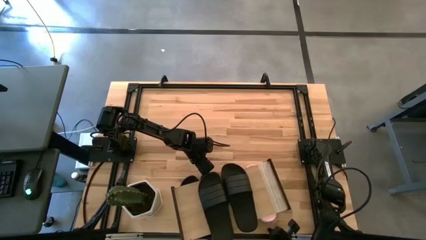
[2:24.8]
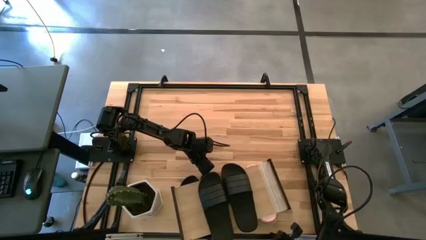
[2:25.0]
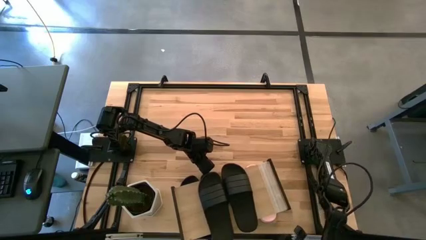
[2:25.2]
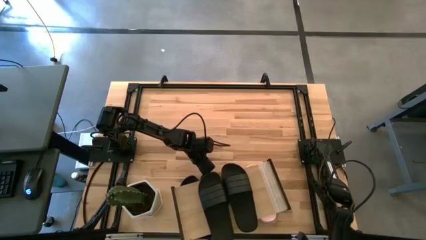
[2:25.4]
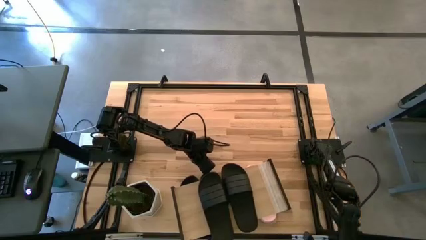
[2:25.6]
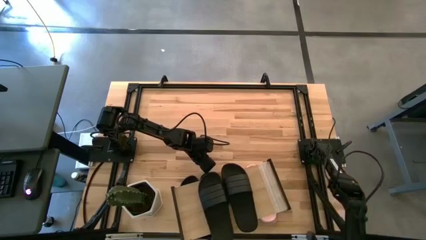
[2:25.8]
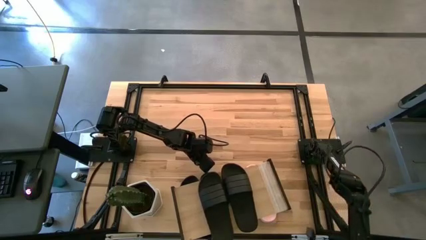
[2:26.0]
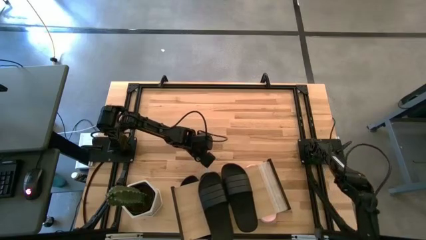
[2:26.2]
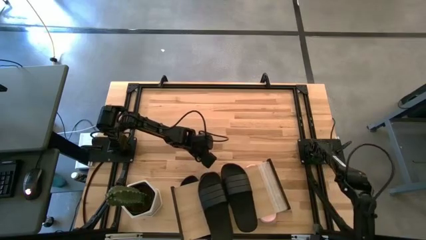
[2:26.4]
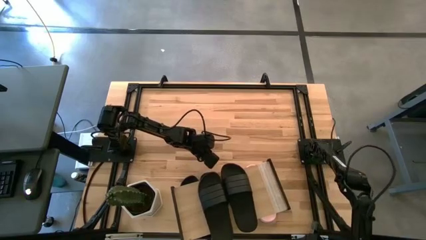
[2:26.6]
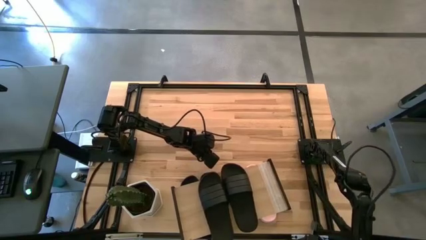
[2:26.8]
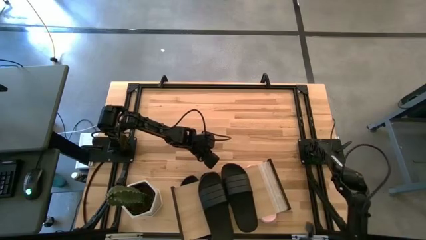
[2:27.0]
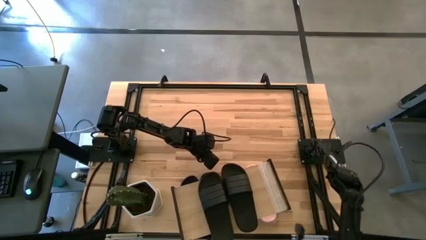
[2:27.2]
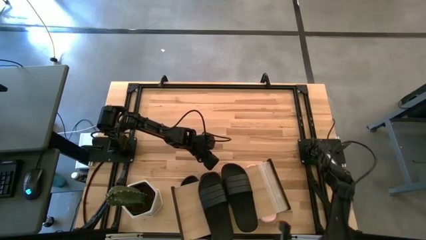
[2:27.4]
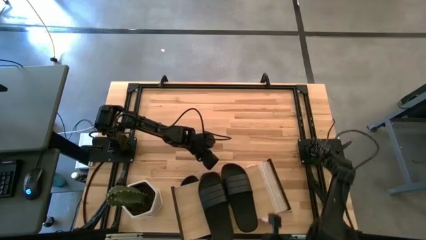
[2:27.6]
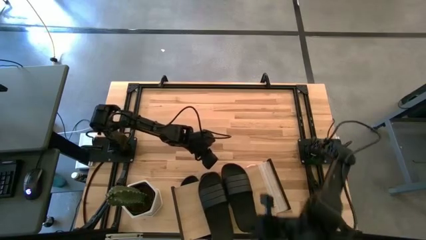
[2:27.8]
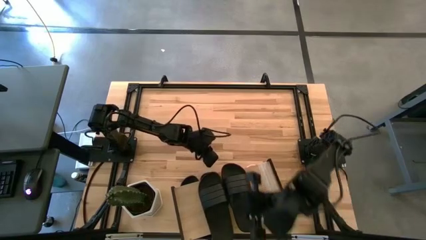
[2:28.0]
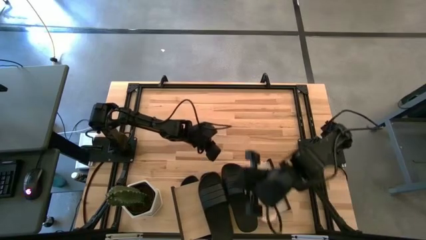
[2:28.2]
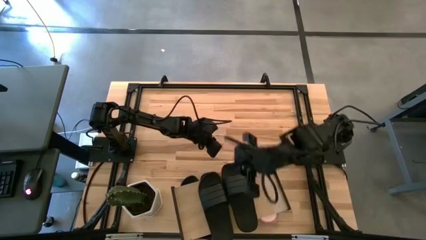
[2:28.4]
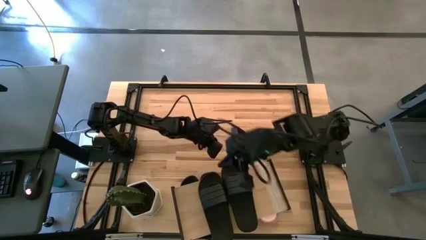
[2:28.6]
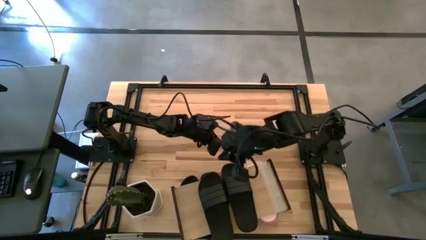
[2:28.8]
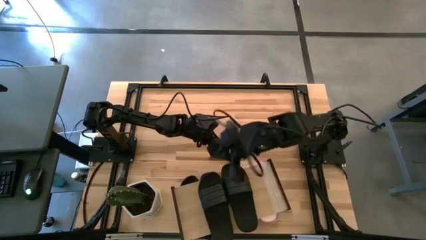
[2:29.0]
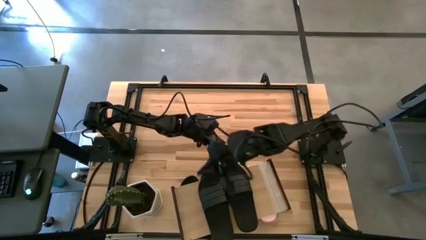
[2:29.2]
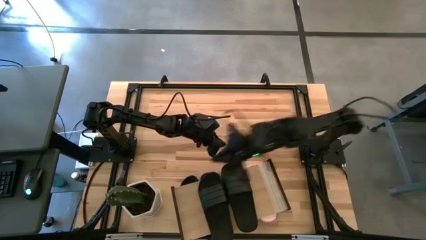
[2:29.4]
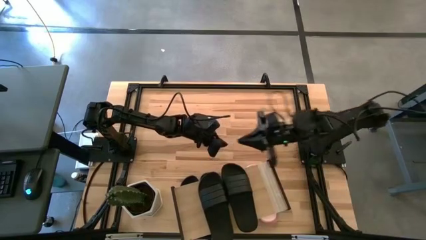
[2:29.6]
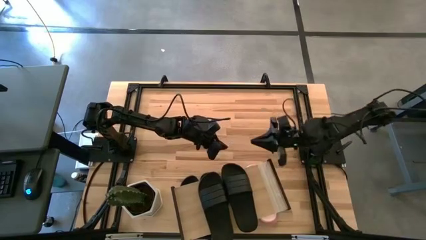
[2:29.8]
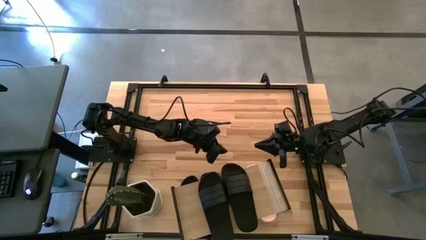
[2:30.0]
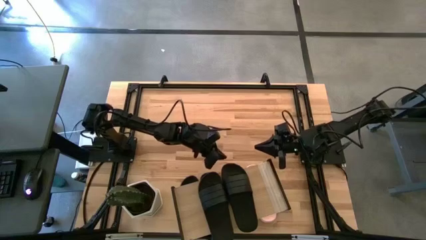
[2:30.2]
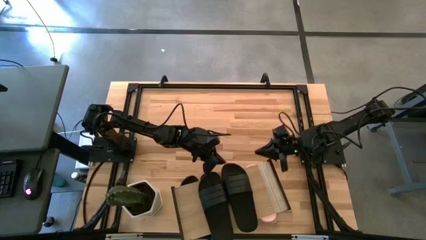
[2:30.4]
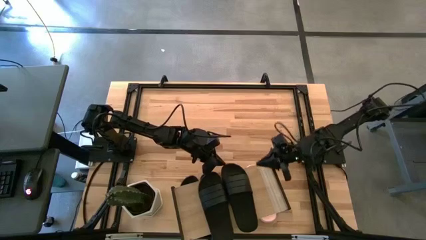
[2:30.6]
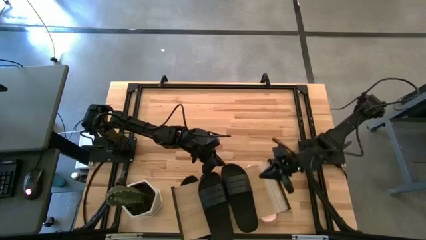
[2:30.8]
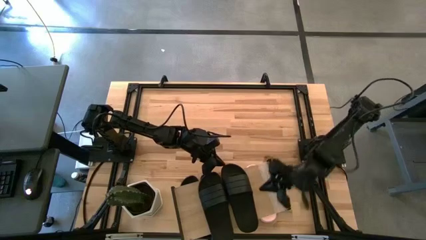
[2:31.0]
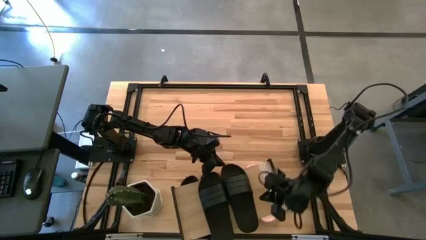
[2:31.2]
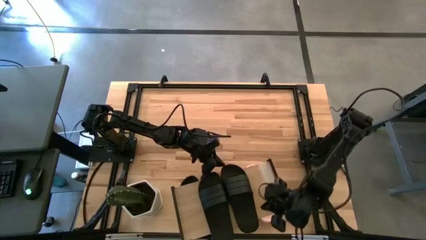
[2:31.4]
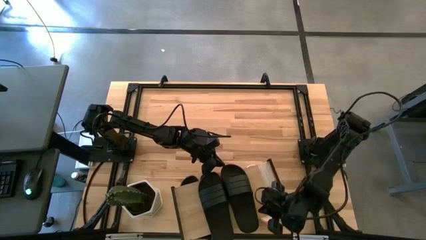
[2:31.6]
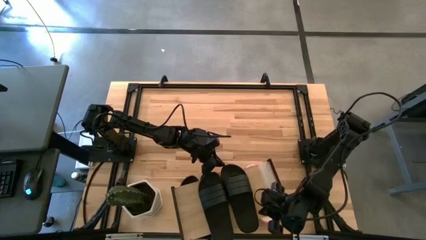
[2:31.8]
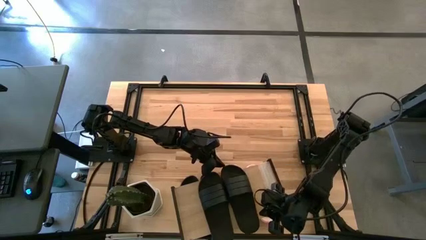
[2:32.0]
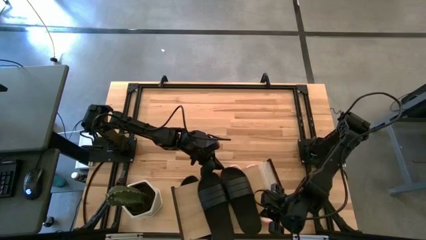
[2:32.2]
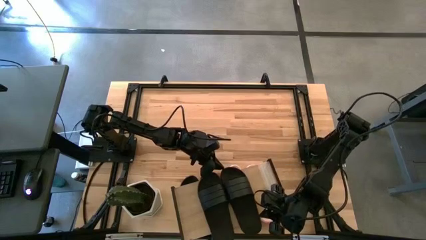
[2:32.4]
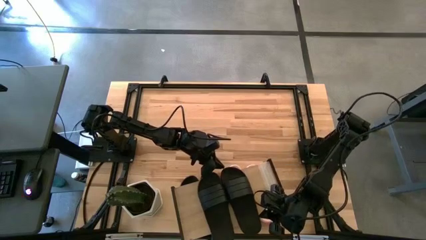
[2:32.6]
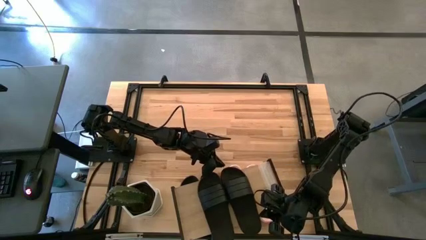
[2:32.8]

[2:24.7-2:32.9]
Task: Pick and place slides into the shelf
Adjust the slippers on the shelf

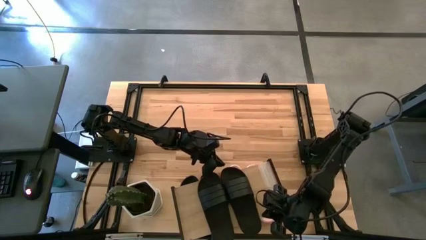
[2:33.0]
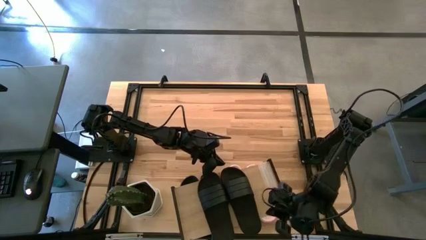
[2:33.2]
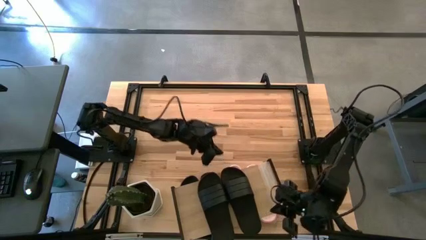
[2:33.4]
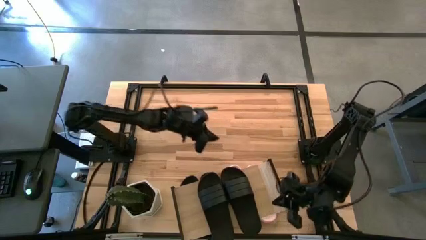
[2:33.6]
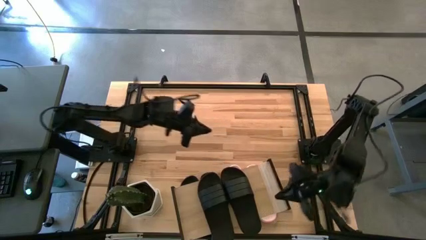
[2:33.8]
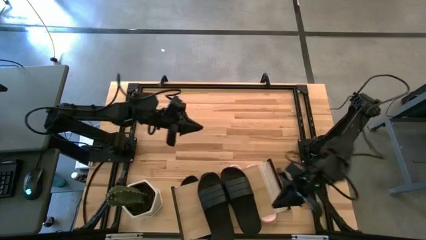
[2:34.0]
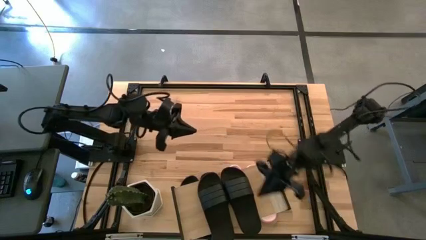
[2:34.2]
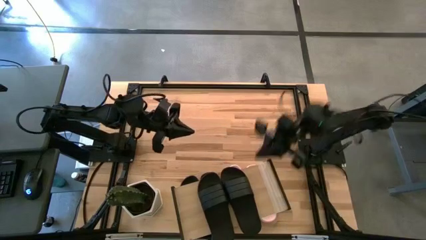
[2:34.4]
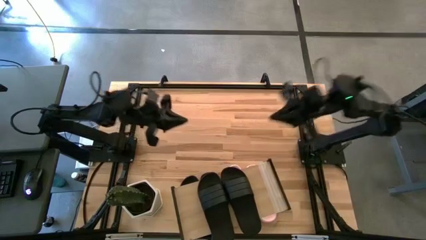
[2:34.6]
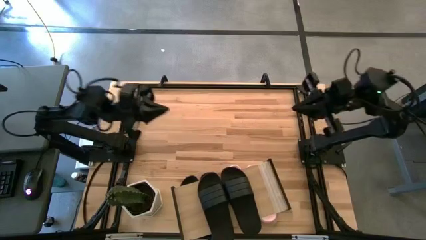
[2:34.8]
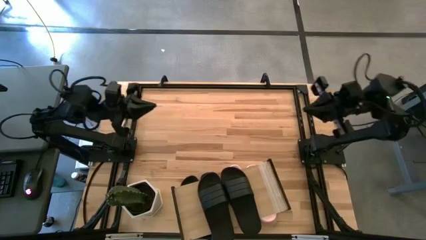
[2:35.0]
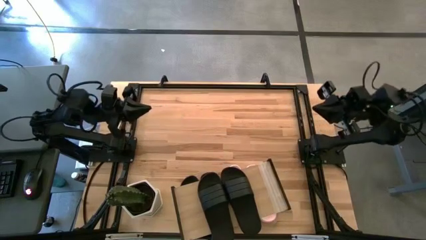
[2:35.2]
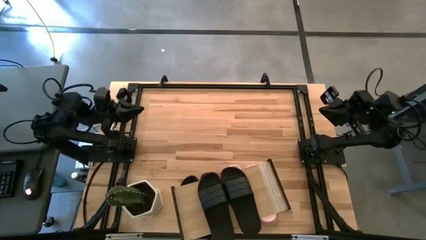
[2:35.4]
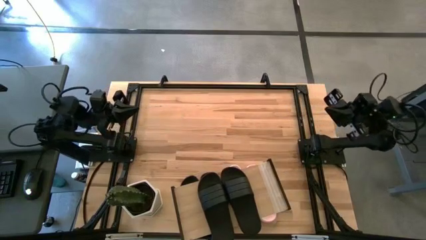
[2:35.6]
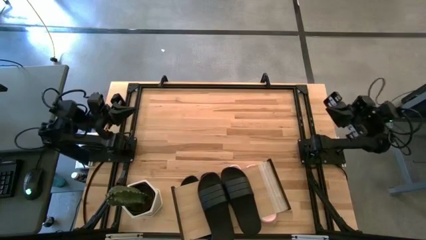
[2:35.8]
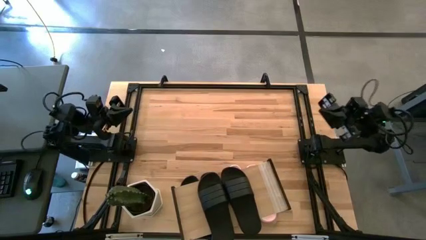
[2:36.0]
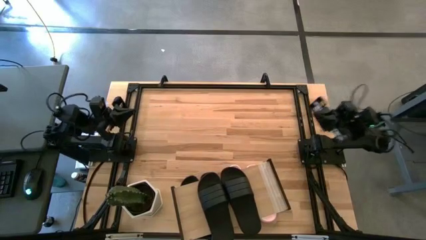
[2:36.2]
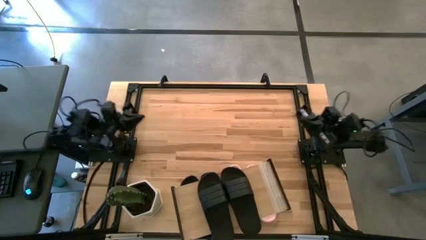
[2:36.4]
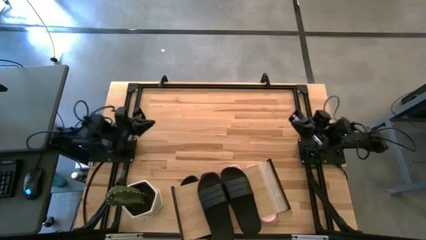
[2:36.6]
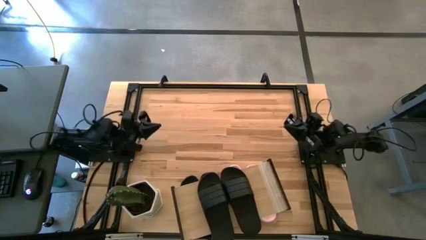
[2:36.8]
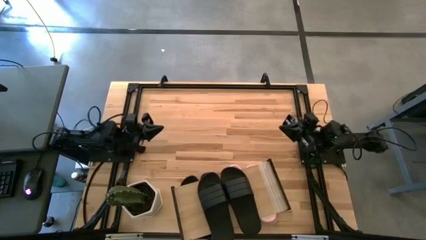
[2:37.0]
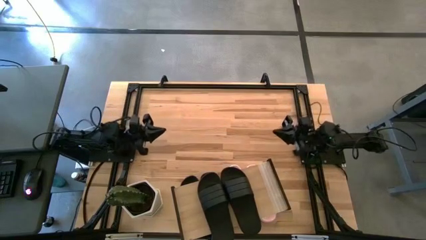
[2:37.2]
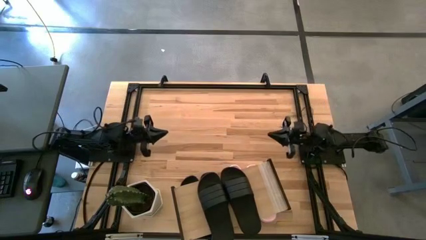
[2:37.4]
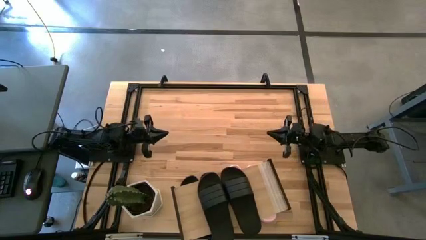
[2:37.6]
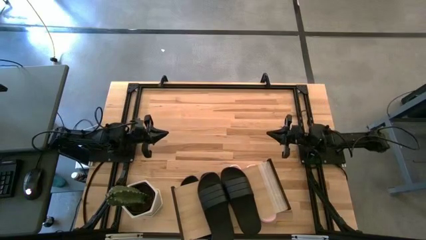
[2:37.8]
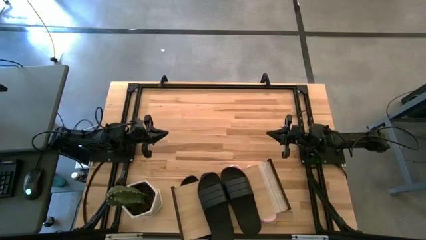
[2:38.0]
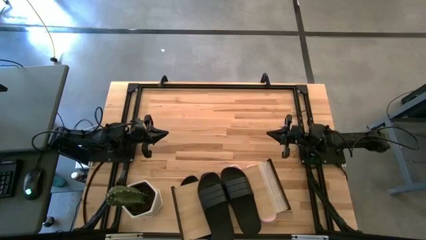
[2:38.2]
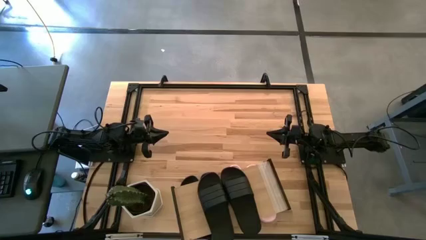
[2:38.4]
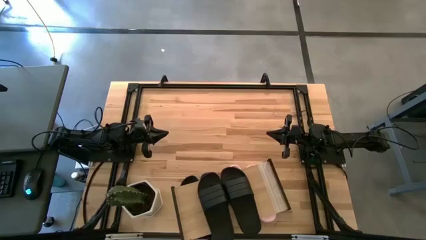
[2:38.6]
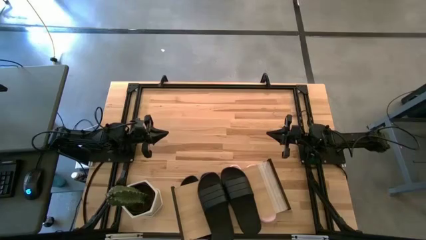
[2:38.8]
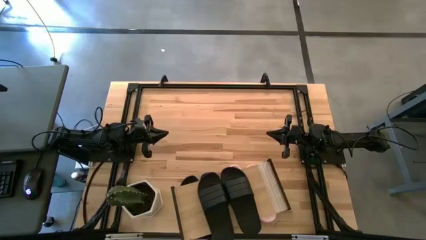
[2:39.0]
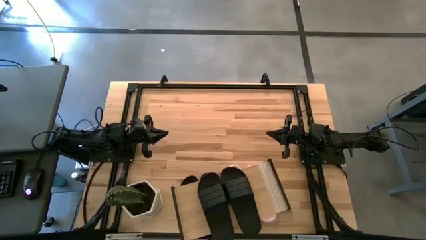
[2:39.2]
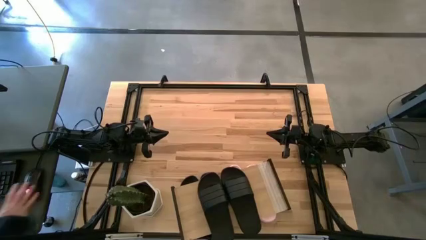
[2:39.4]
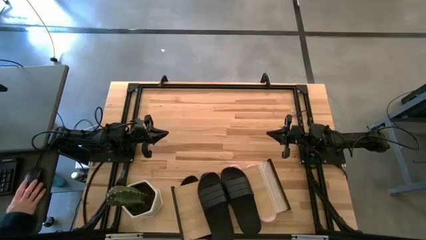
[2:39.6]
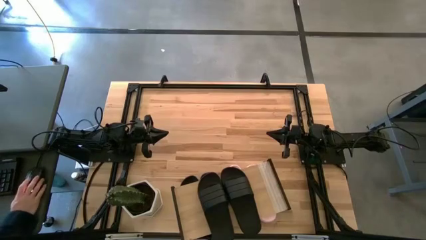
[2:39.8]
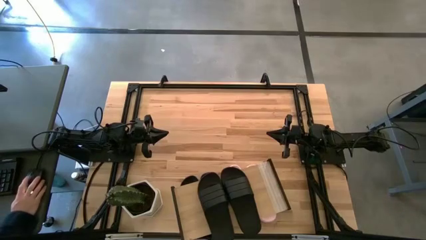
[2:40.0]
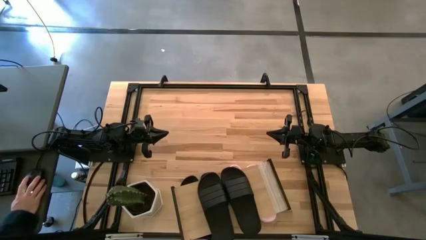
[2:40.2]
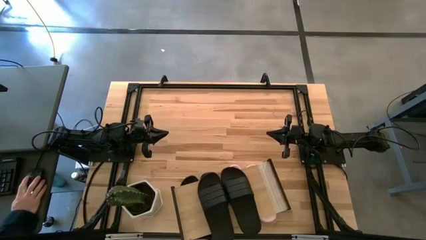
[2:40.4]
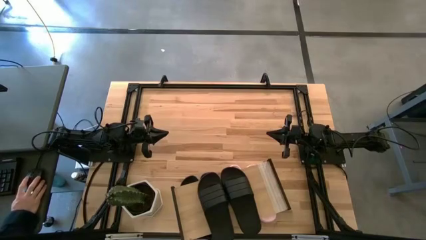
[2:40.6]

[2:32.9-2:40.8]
Return to Home Position
